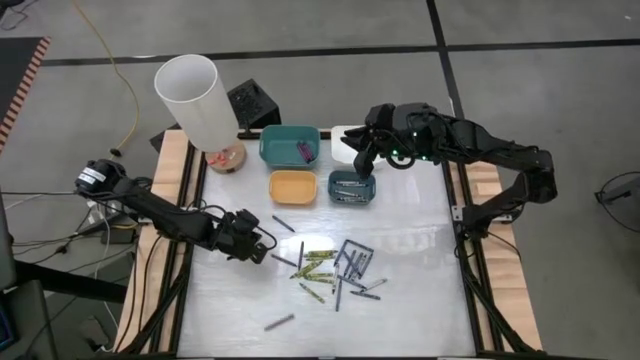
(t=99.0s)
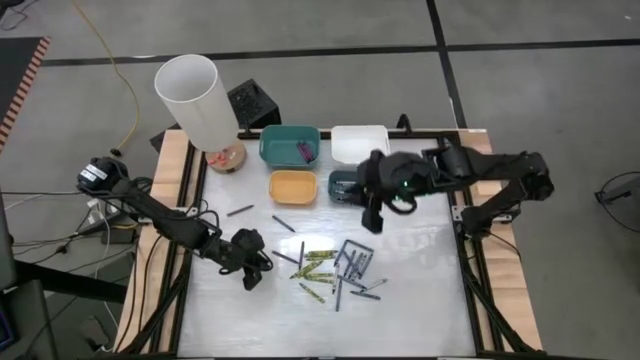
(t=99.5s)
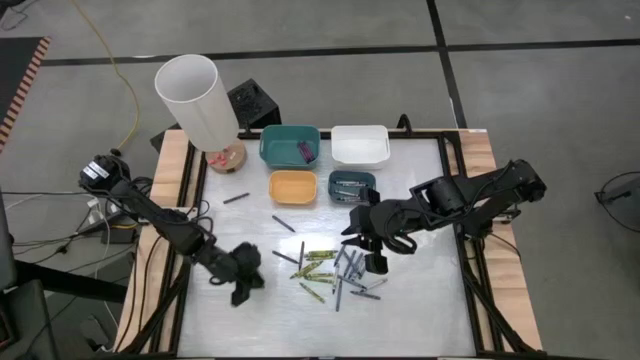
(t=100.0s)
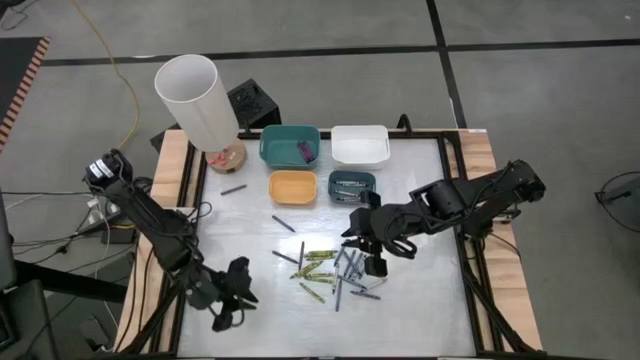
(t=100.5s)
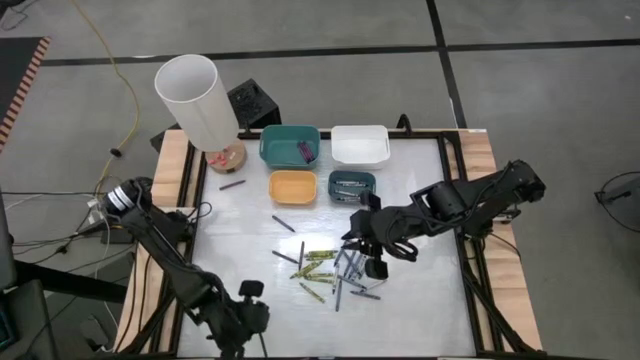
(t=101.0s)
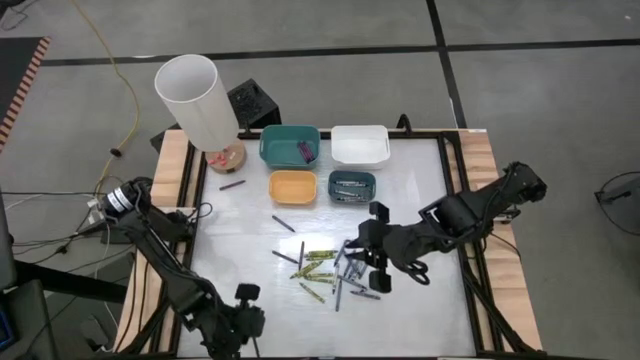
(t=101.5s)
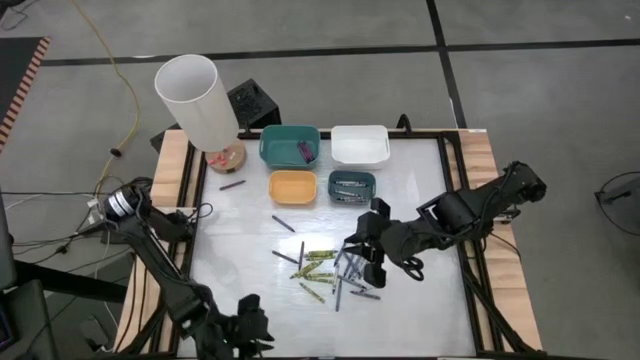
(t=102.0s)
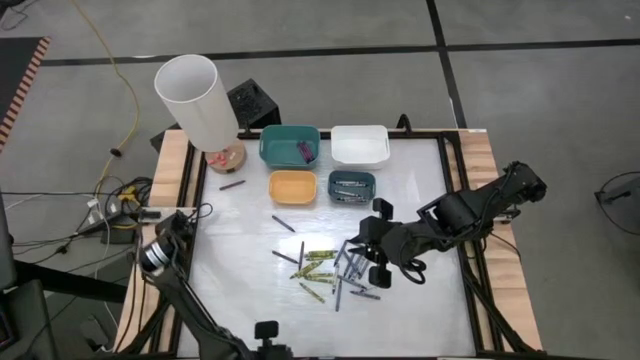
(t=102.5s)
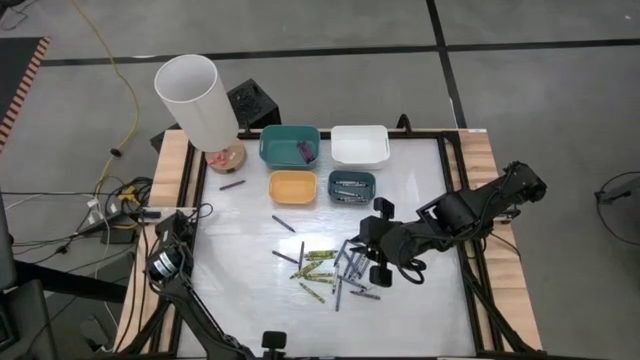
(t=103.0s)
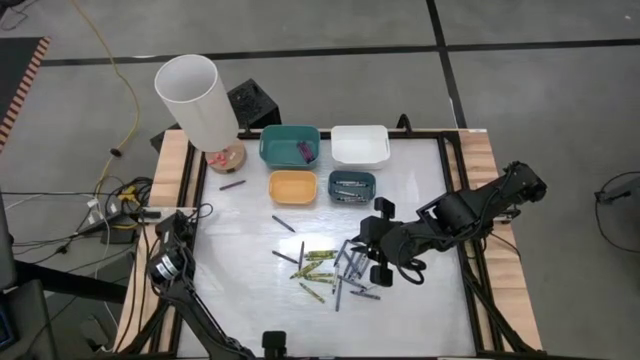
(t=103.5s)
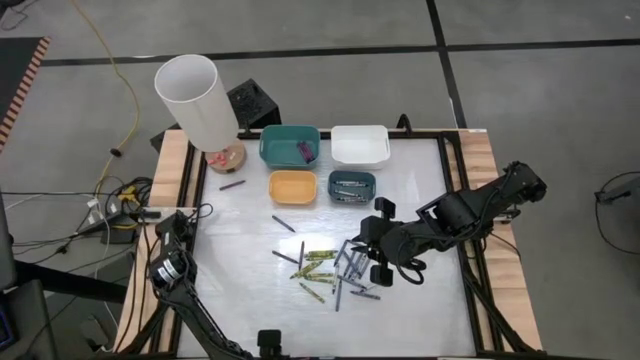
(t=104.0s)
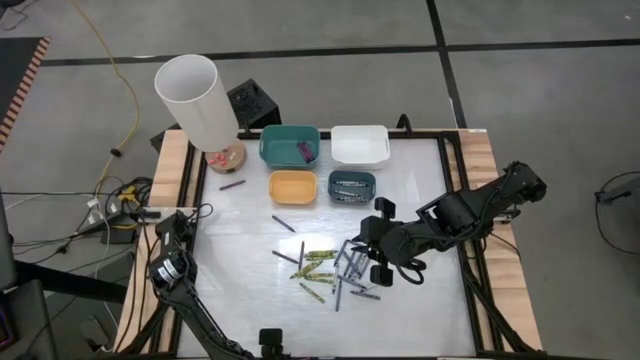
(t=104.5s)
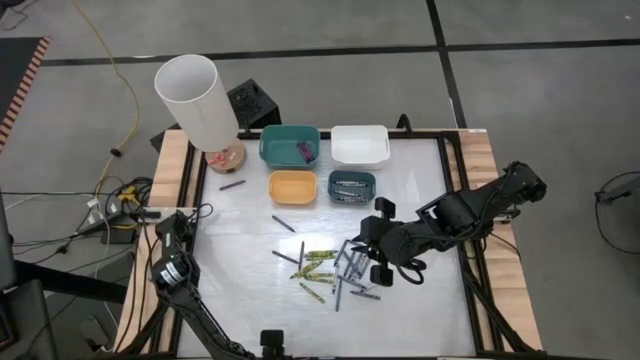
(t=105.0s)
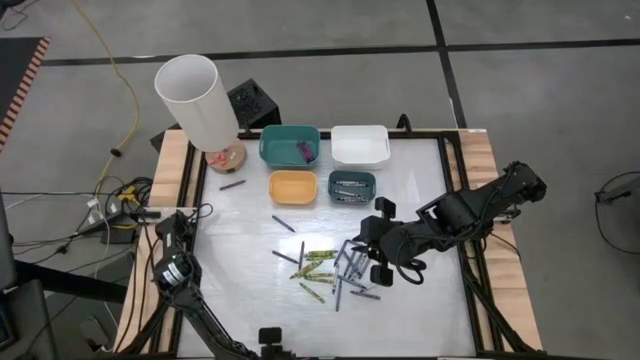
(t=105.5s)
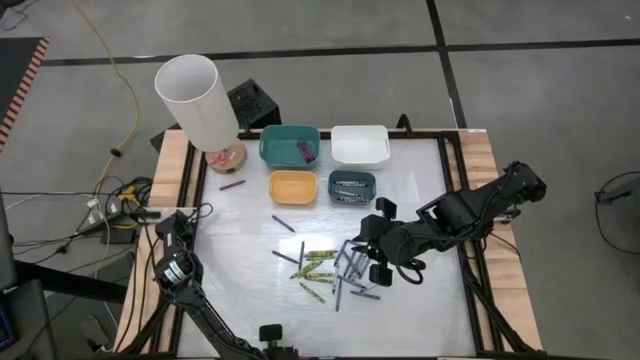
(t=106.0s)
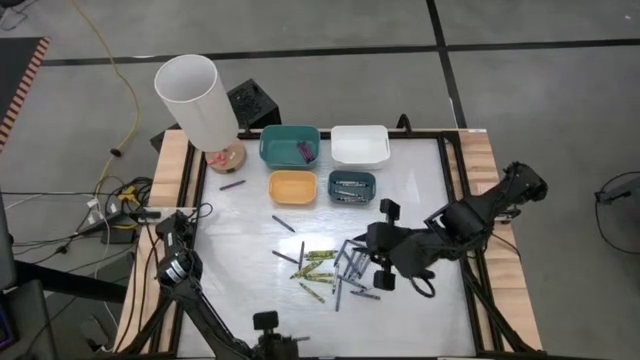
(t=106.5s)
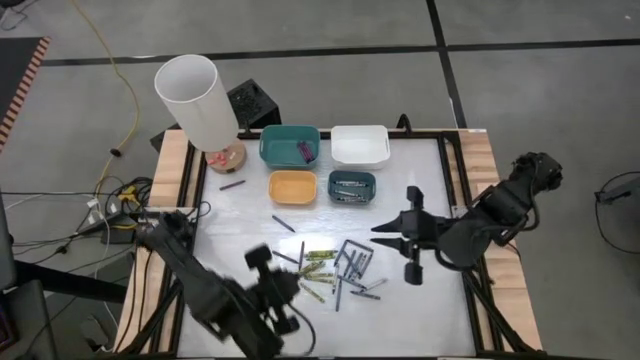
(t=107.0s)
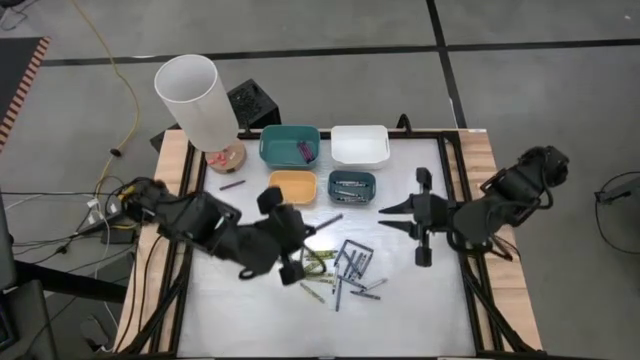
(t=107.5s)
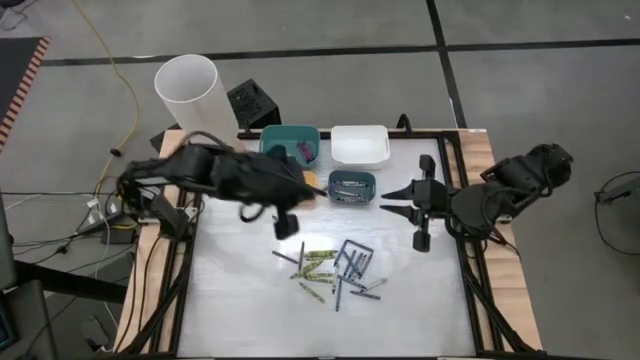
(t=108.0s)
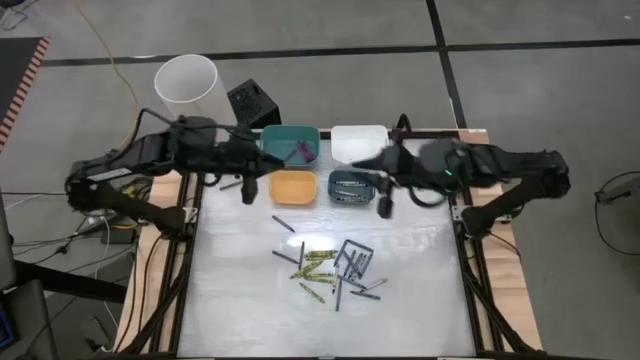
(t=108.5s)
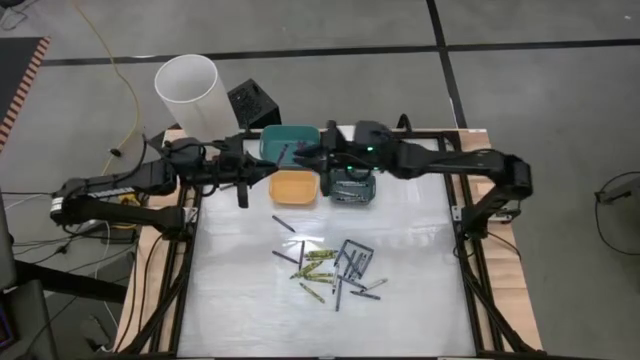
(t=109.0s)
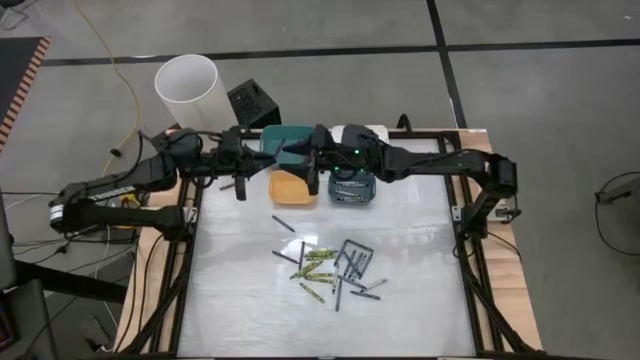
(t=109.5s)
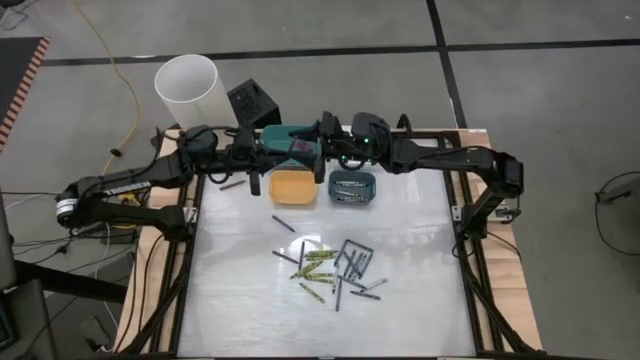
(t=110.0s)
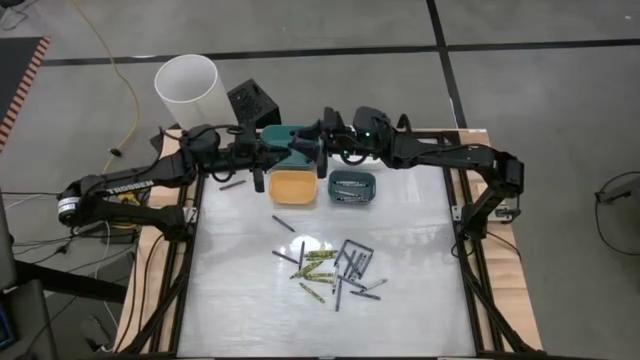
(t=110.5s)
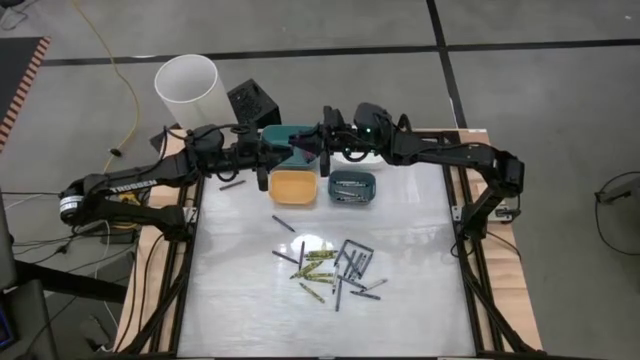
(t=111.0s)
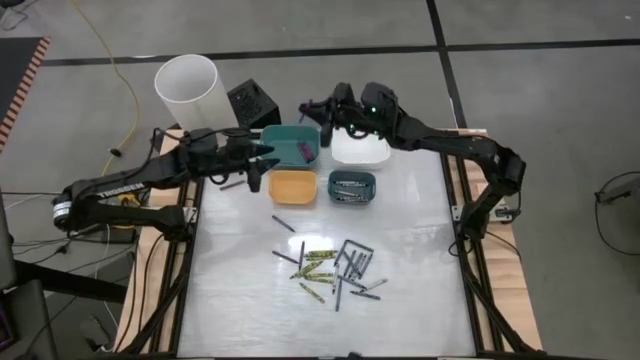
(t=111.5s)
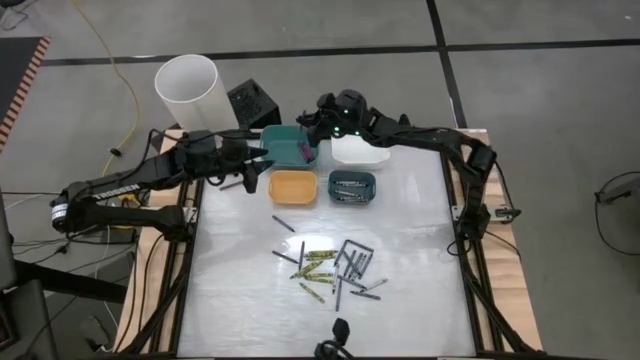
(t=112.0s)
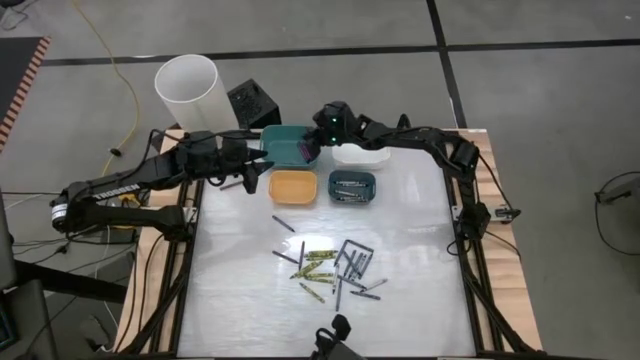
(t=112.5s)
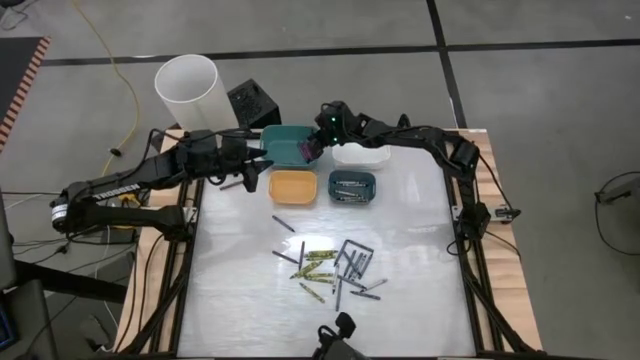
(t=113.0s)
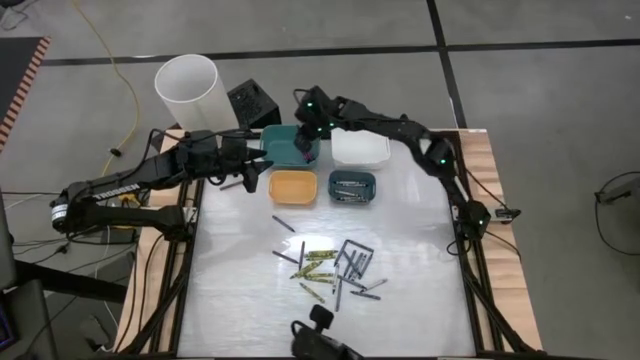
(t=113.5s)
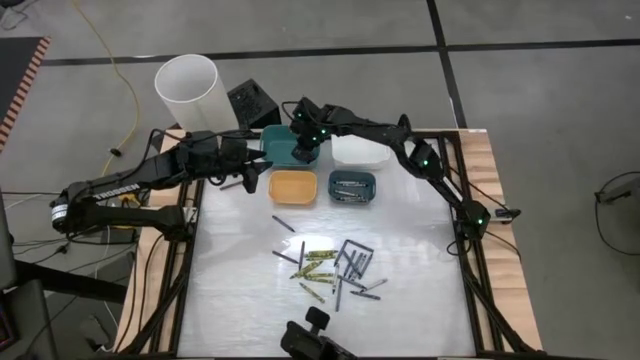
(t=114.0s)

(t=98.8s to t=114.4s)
Task: Sort crayons
Put the violet crayon into the green bin

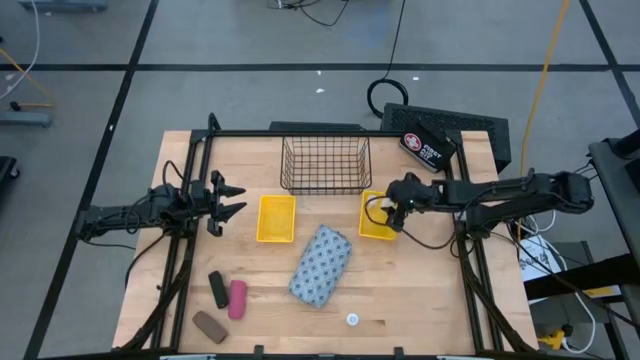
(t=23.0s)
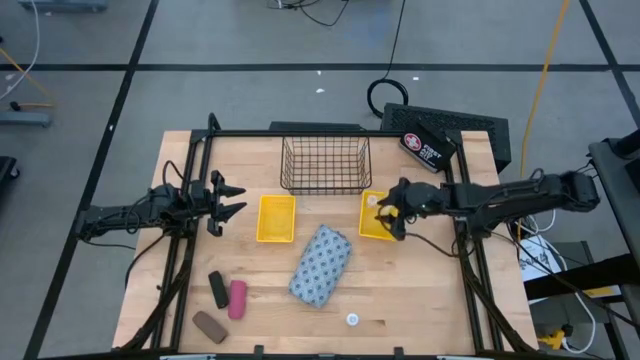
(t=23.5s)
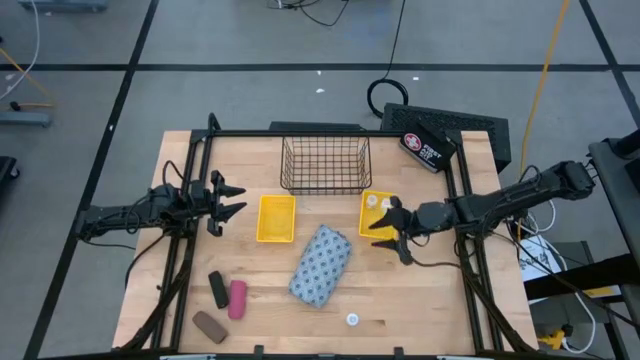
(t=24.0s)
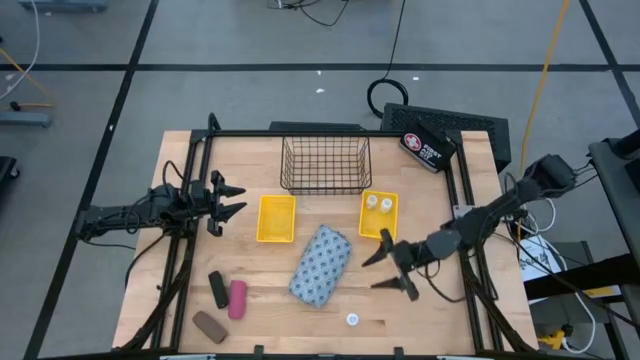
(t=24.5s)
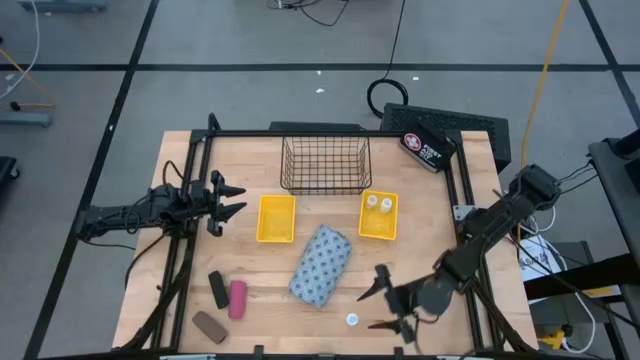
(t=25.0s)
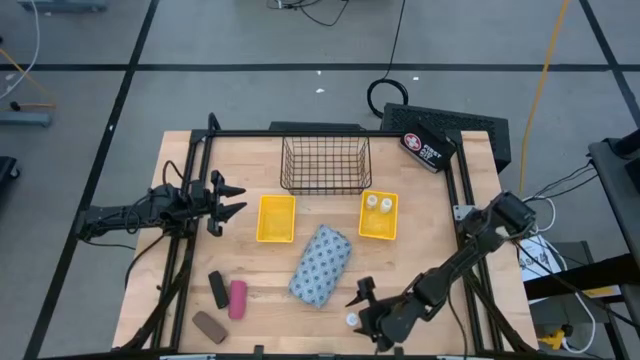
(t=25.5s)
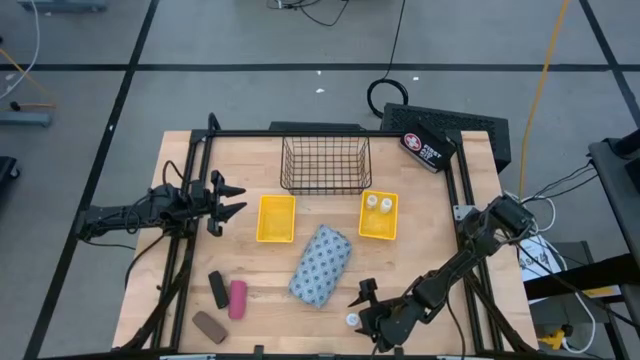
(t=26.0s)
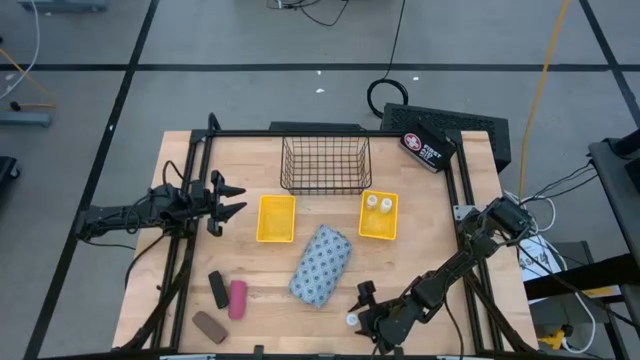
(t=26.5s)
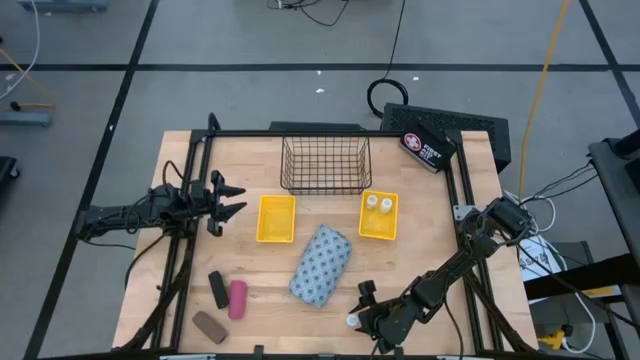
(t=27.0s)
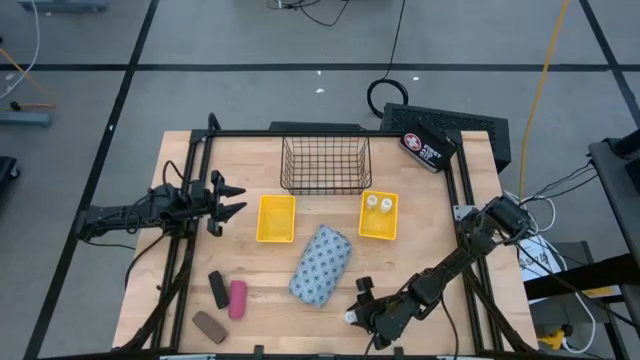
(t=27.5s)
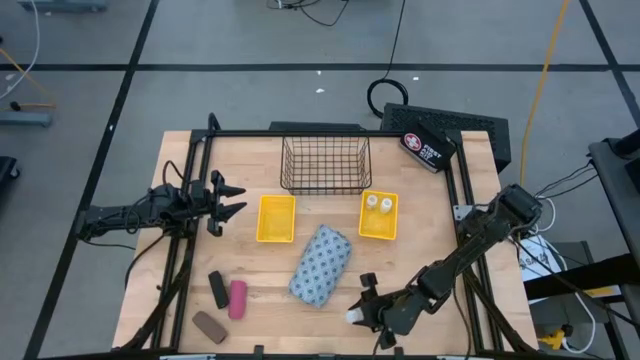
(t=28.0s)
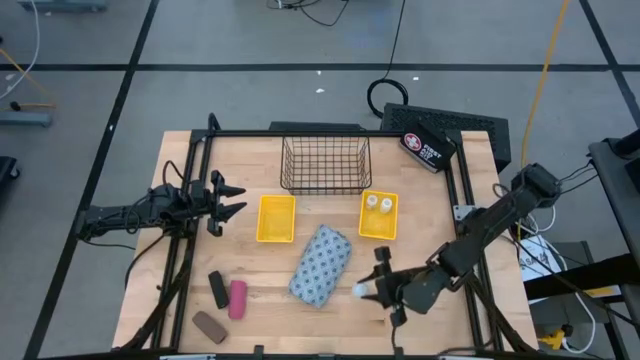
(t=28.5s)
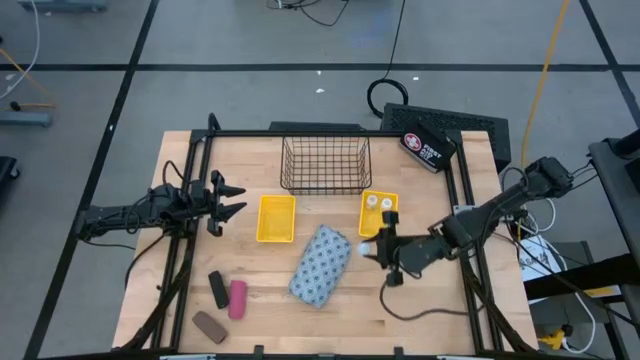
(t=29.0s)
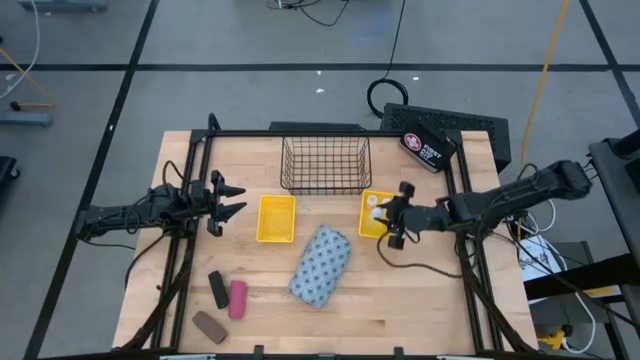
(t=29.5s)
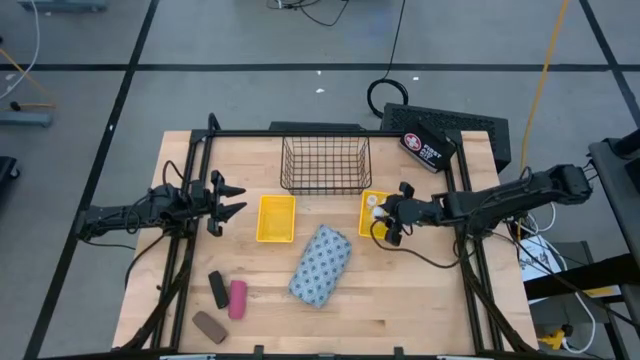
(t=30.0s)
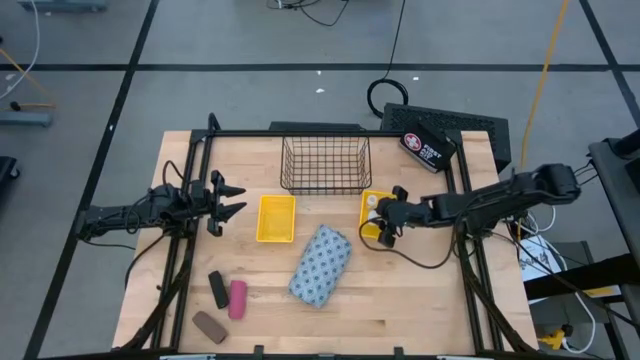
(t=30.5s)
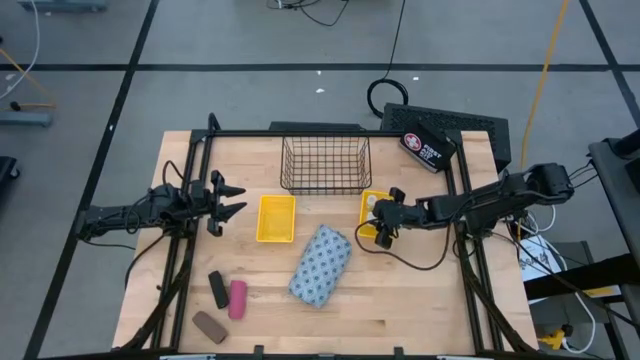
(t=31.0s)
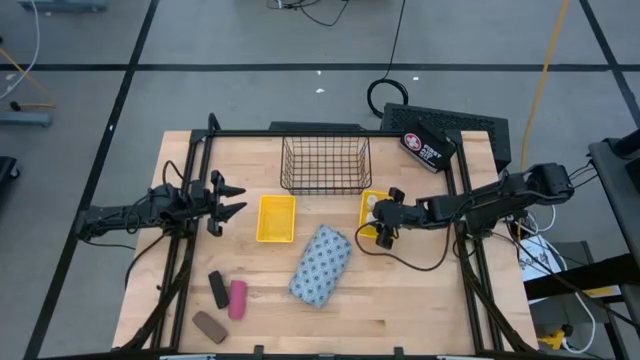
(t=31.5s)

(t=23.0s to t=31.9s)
Task: Pick & Place Medicine items
Put the transparent pill bottle into the right yellow basket
